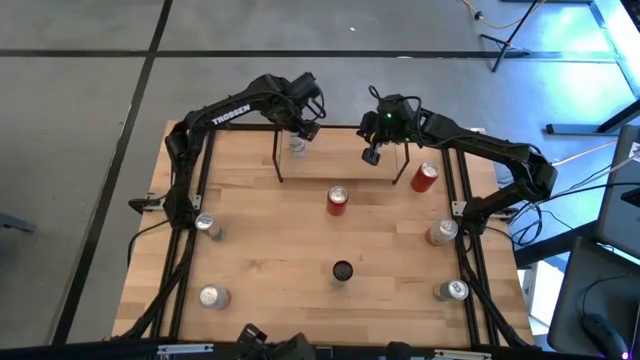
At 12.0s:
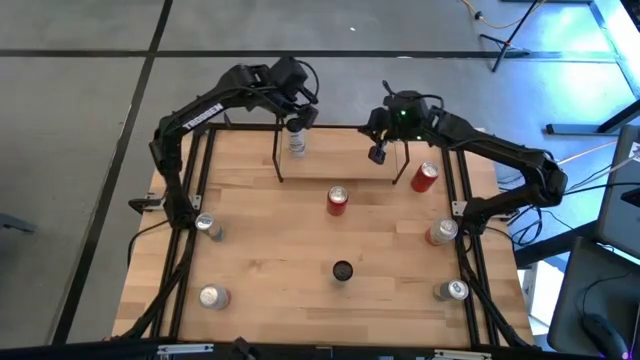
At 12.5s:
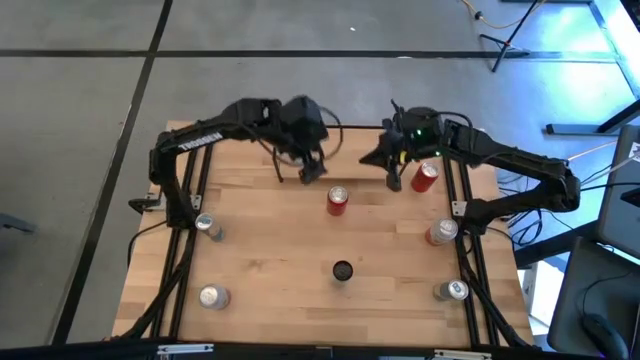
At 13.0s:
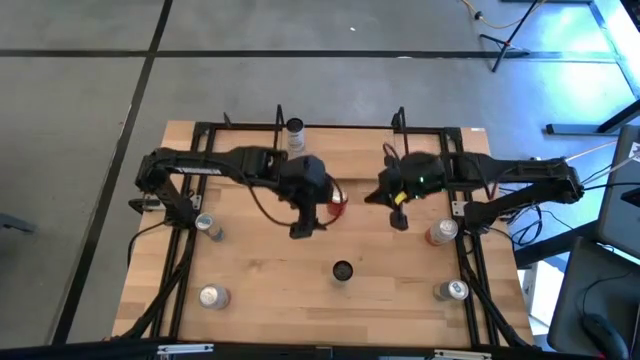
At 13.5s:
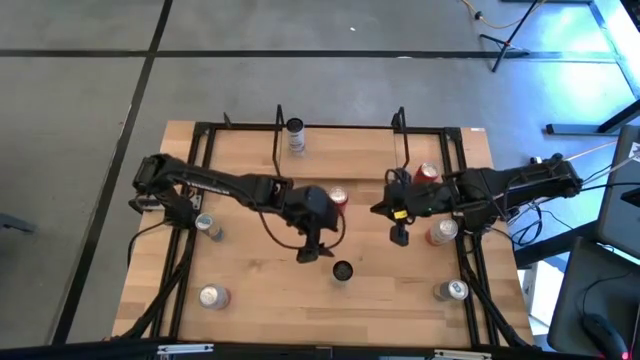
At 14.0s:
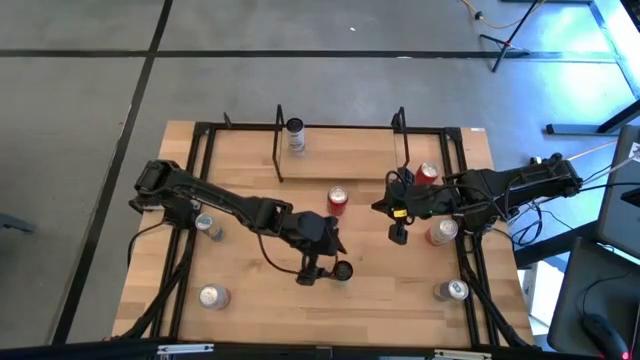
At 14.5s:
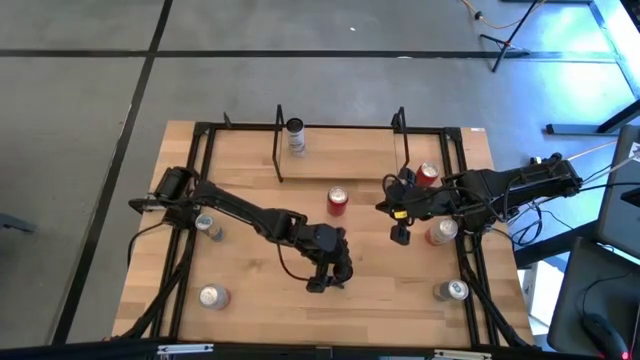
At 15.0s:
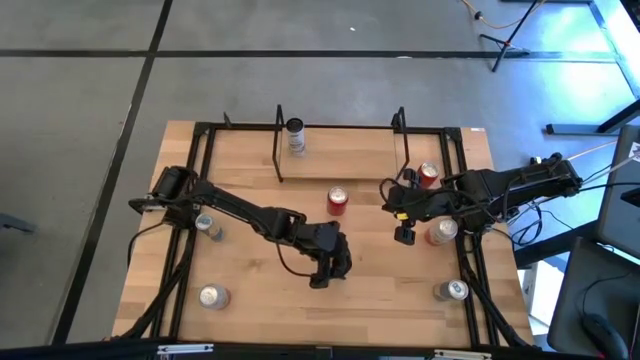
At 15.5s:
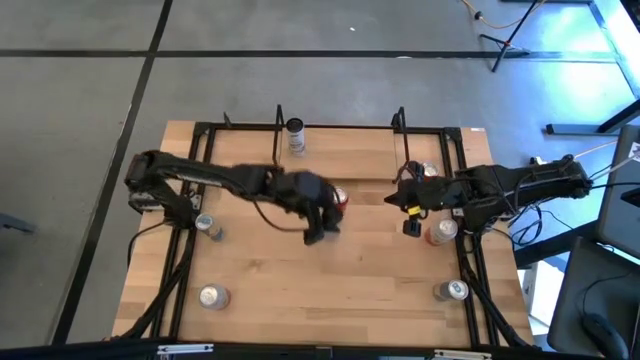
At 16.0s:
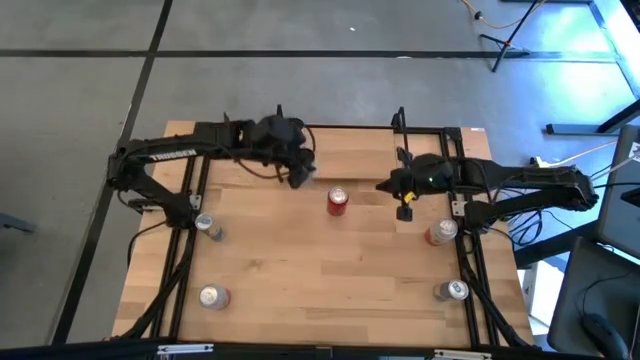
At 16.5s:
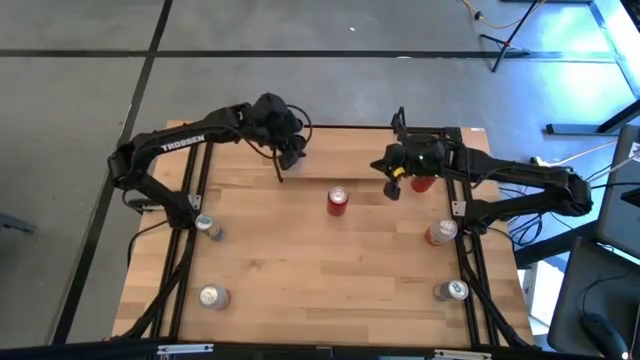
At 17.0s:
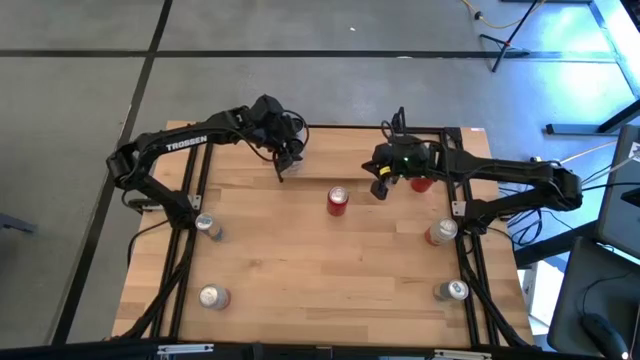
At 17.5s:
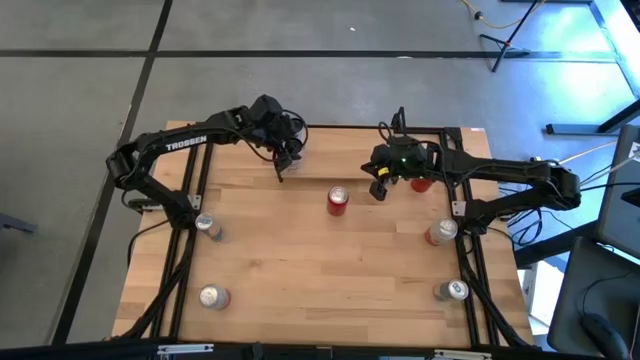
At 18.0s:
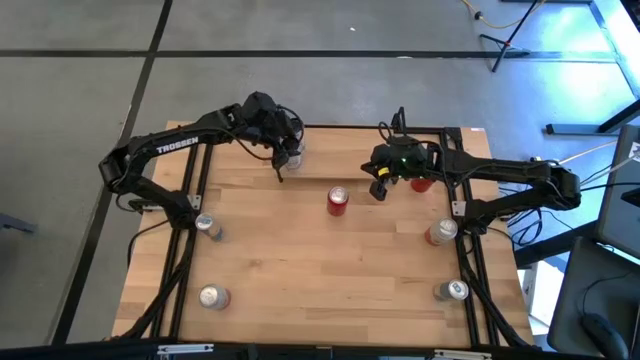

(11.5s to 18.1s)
Task: Place canned beverage on shelf
Put the white soda can on the shelf

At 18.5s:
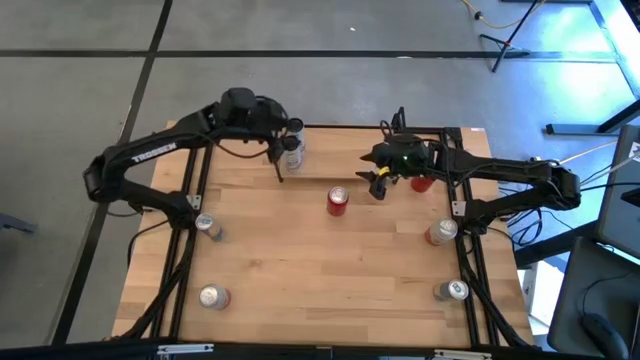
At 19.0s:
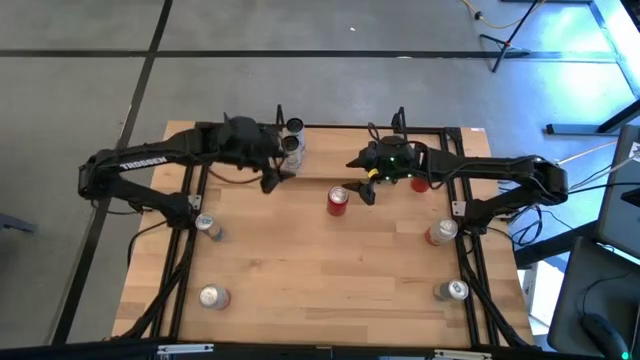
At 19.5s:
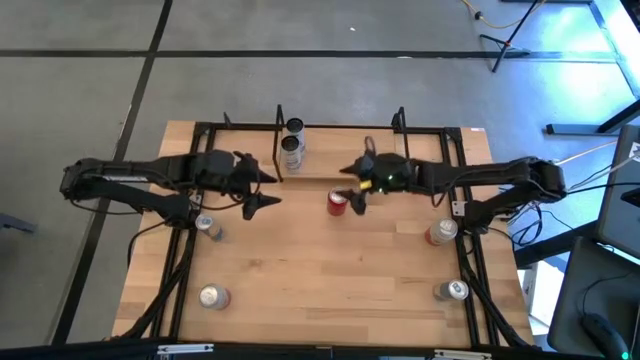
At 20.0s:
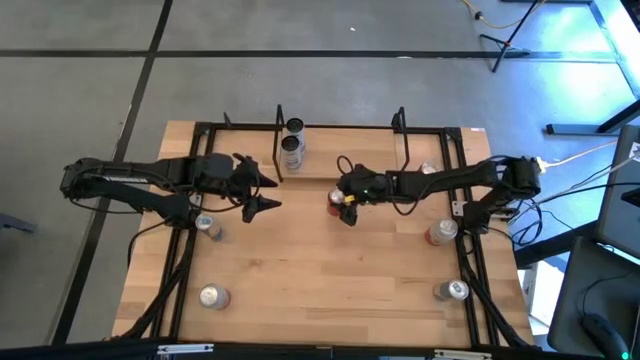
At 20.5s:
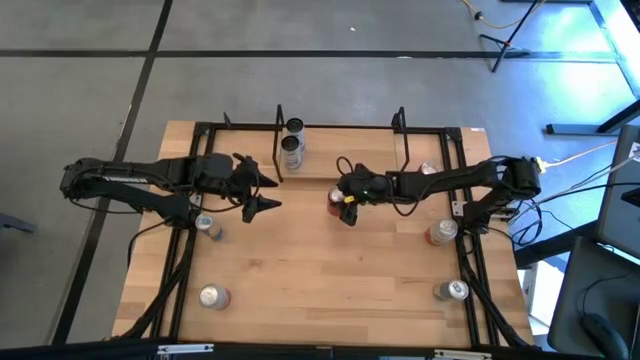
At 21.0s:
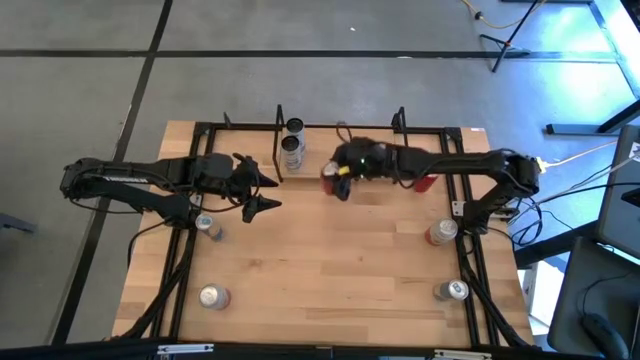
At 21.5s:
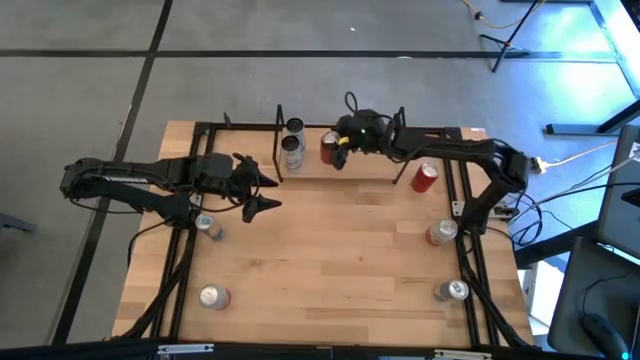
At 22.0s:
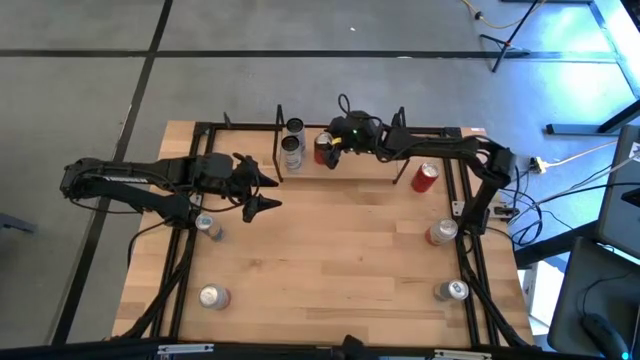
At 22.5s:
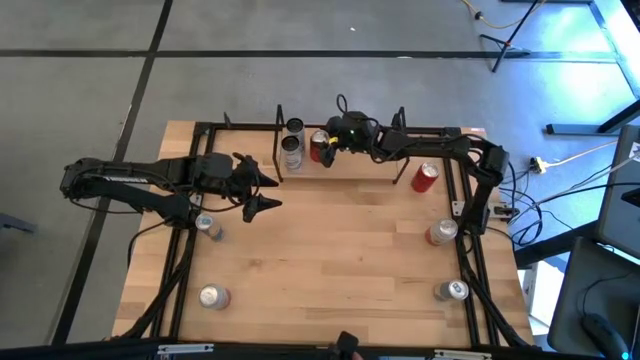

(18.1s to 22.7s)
Put the left red soda can on the shelf

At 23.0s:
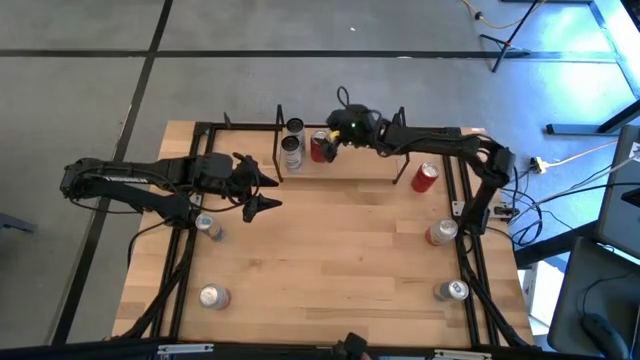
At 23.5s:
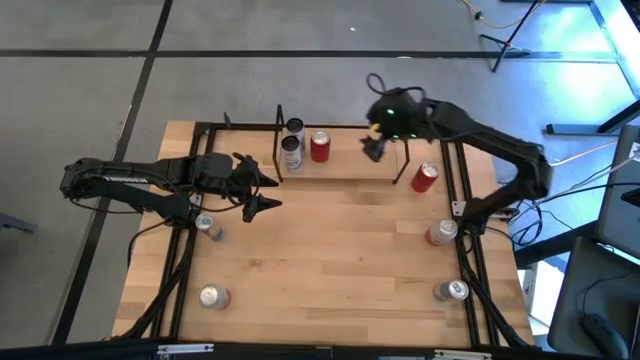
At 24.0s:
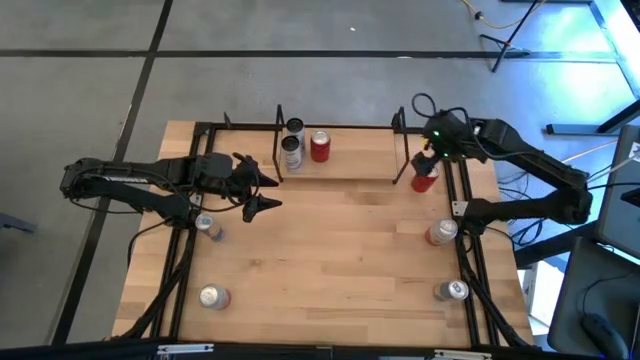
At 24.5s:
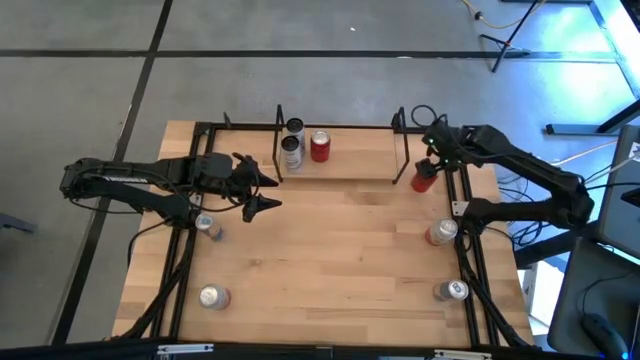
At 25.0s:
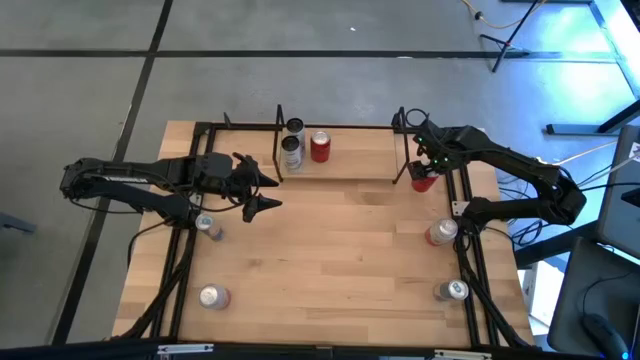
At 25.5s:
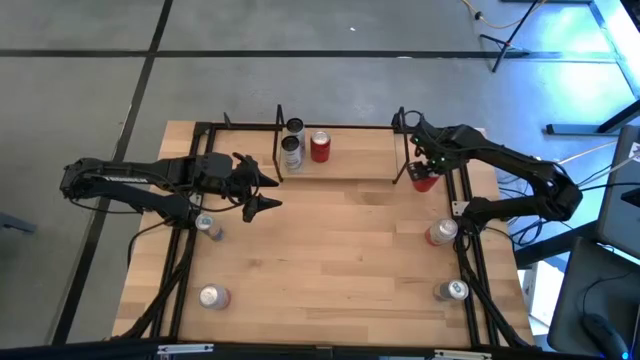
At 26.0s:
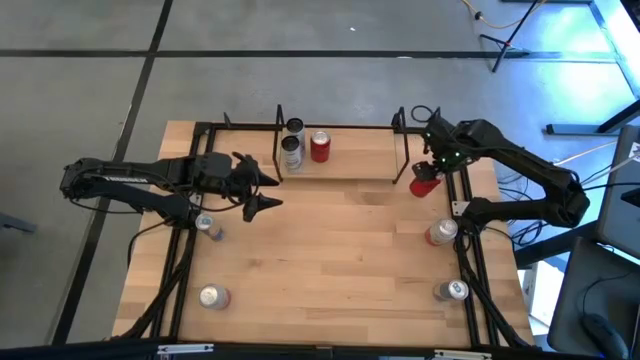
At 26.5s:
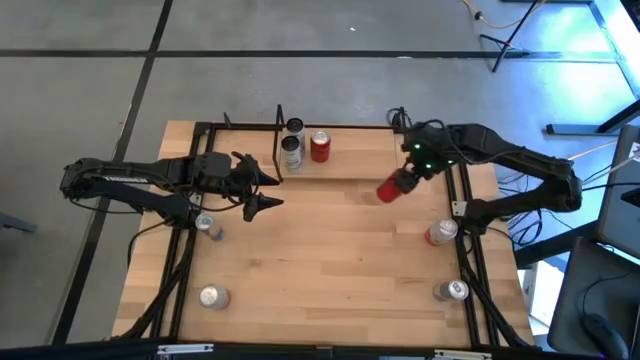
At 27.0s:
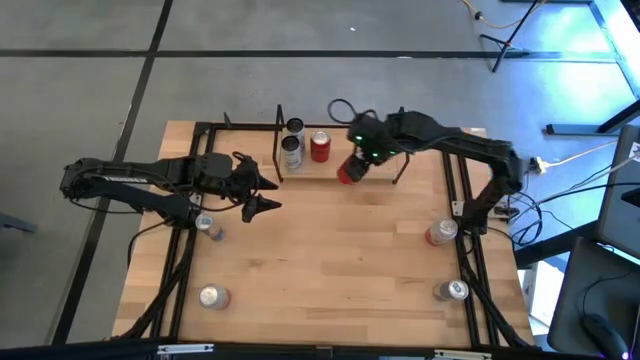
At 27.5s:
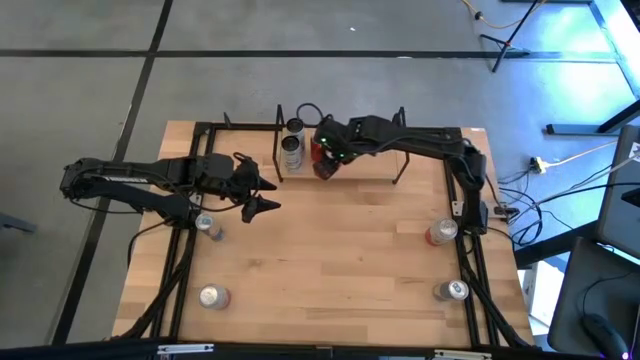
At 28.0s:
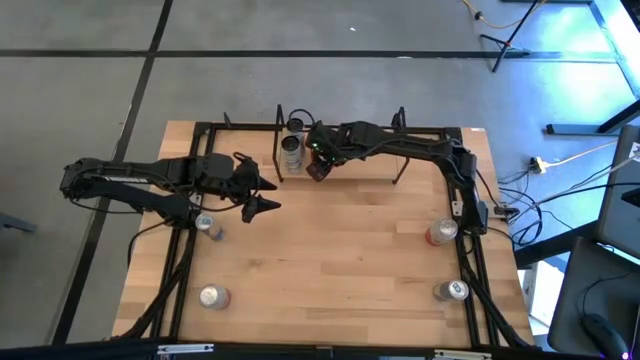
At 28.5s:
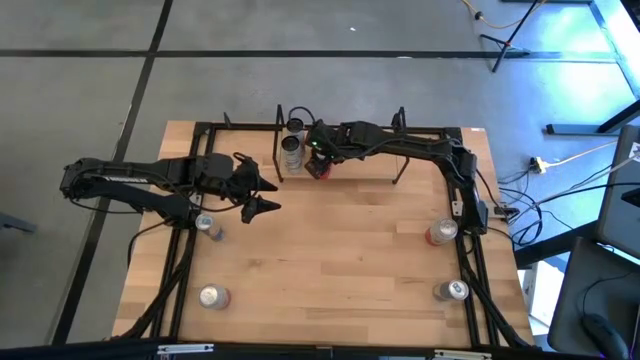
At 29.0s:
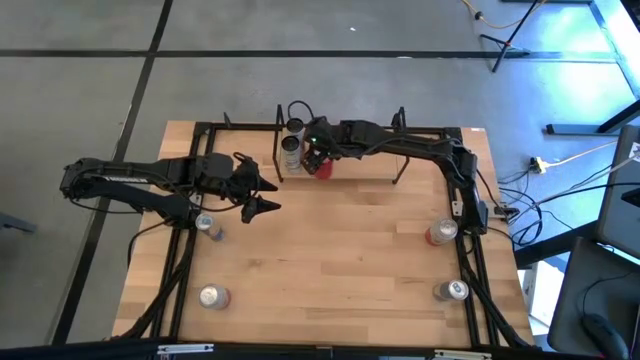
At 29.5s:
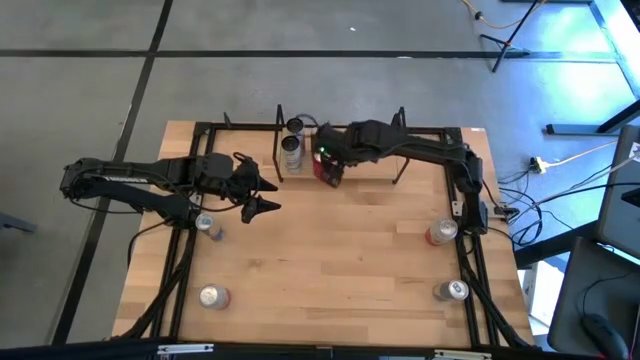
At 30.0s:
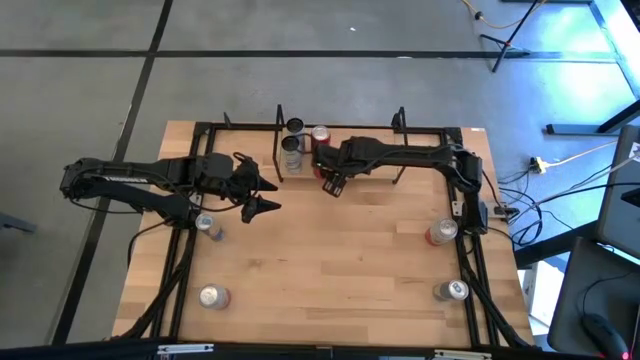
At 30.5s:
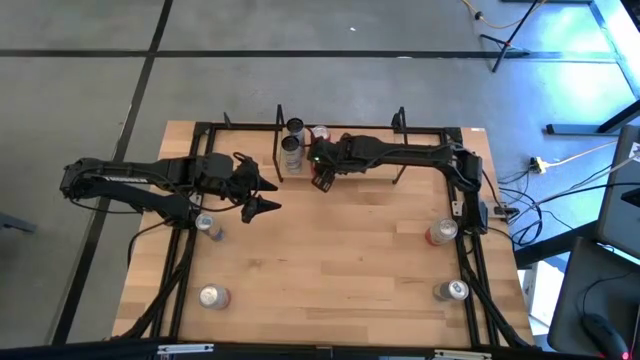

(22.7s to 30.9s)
Put the red soda can on the shelf

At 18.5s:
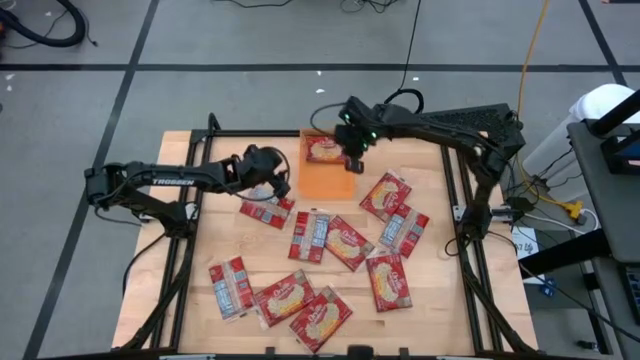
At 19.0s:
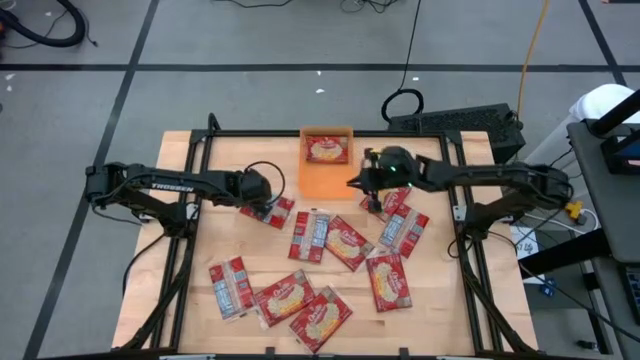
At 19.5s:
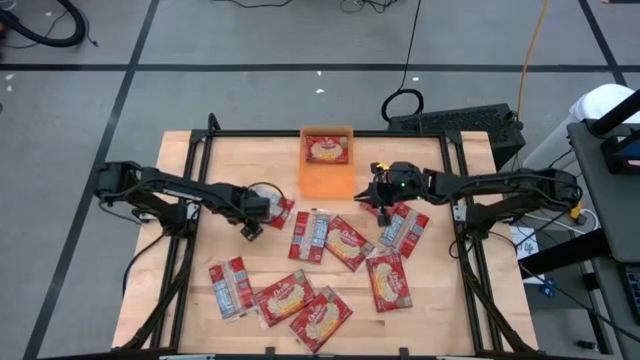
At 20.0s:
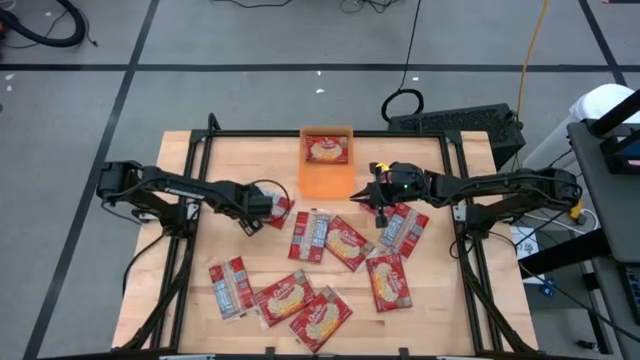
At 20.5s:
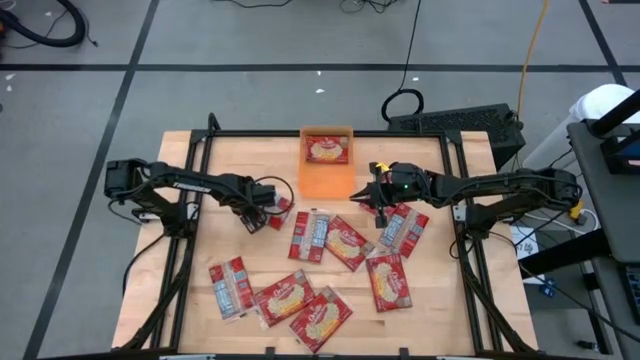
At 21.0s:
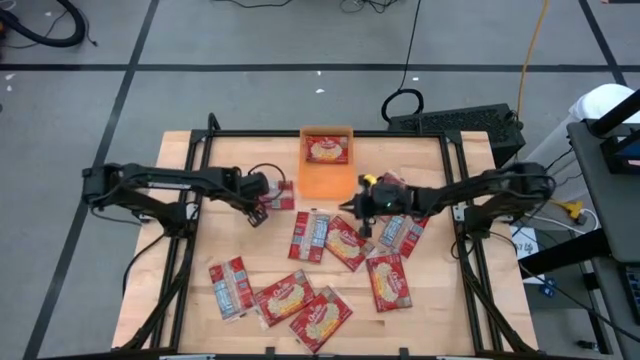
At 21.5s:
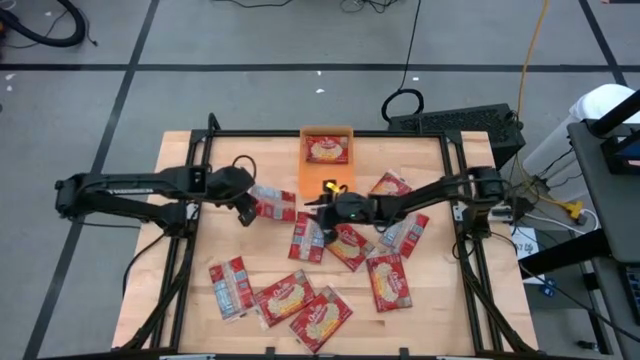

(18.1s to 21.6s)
Task: Sort popcorn bags into baskets
Put the red popcorn bag into the orange bin
